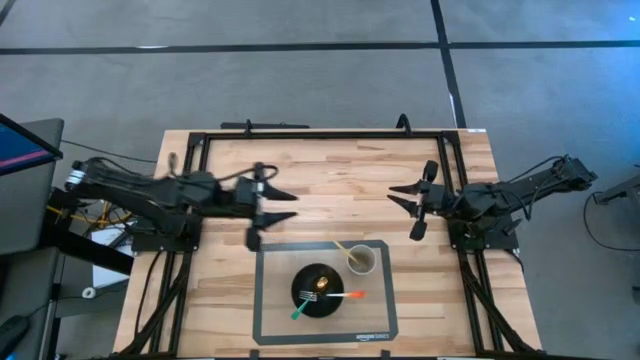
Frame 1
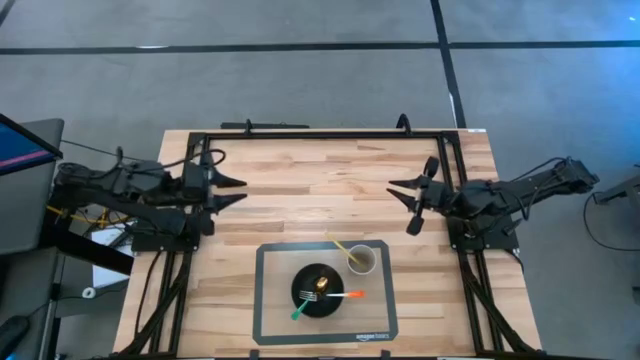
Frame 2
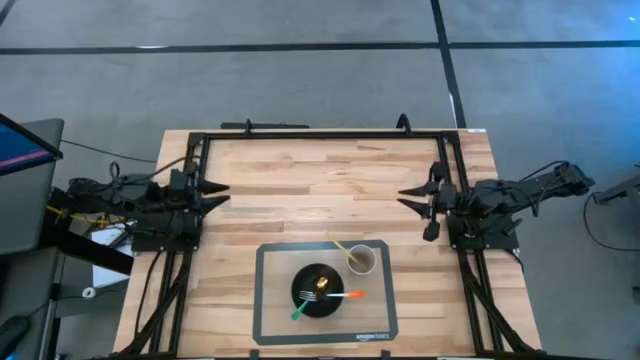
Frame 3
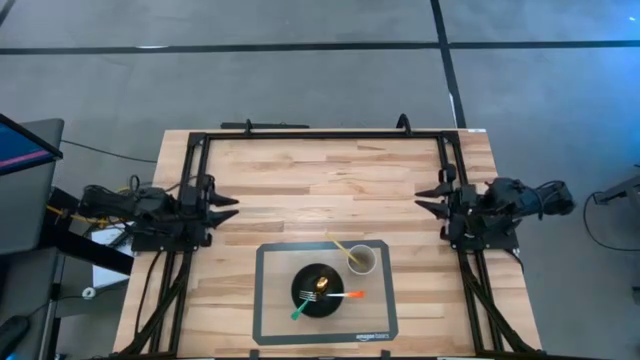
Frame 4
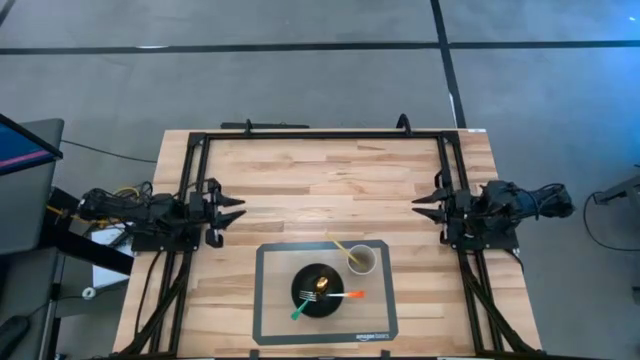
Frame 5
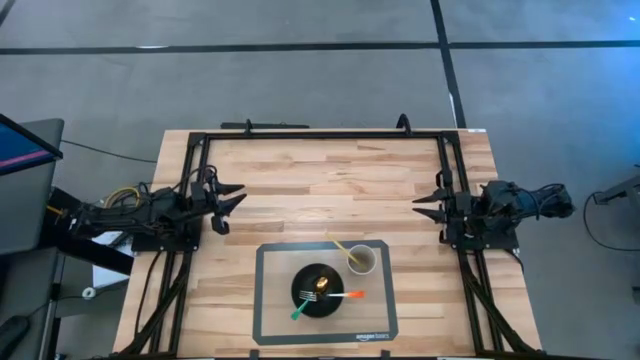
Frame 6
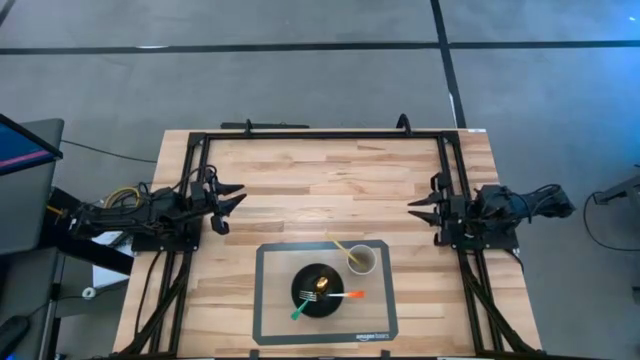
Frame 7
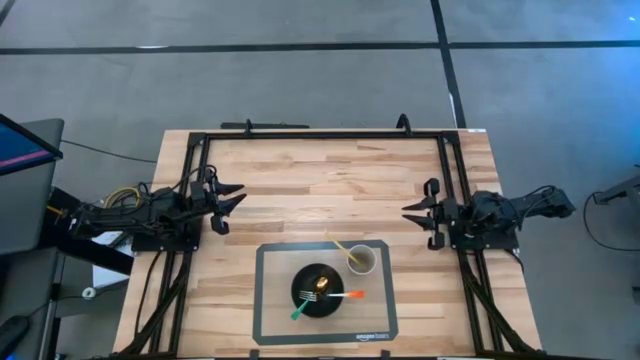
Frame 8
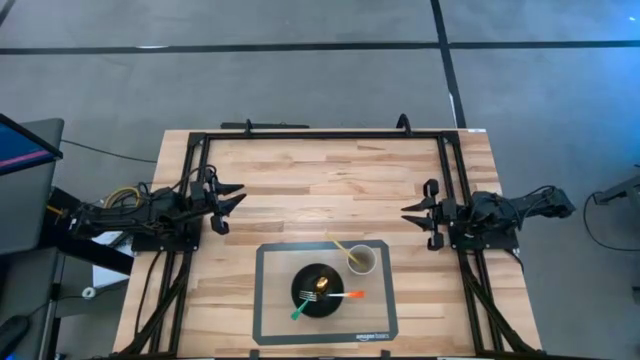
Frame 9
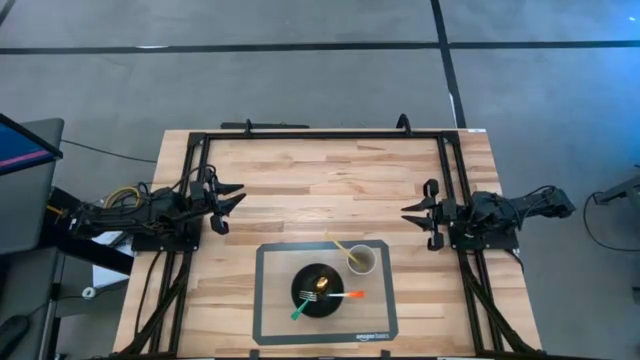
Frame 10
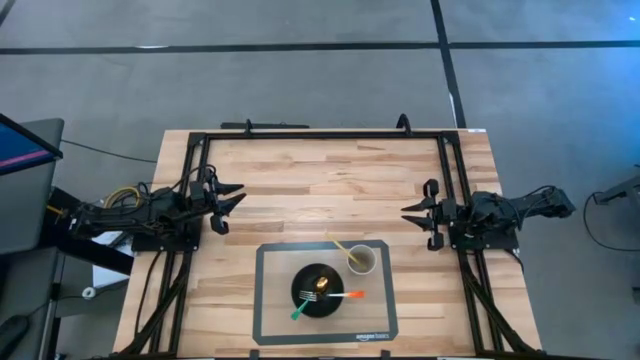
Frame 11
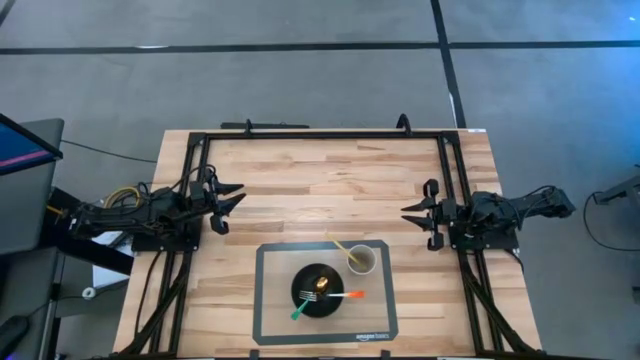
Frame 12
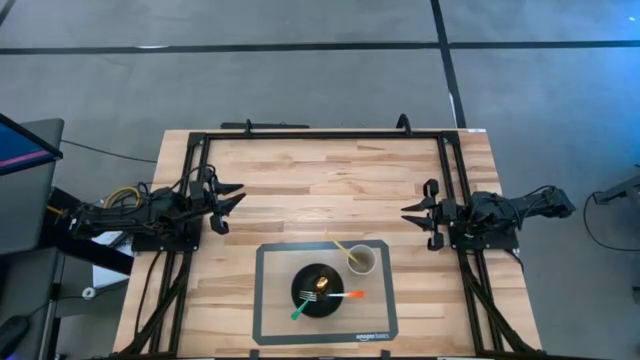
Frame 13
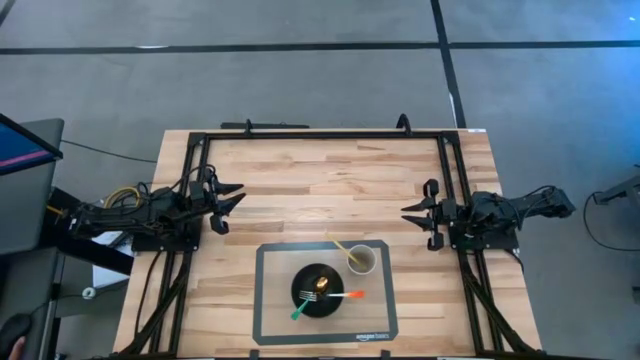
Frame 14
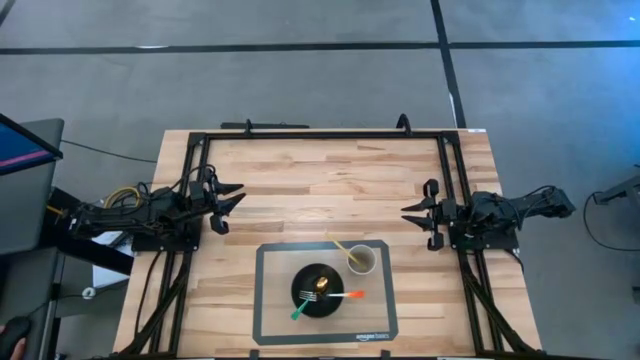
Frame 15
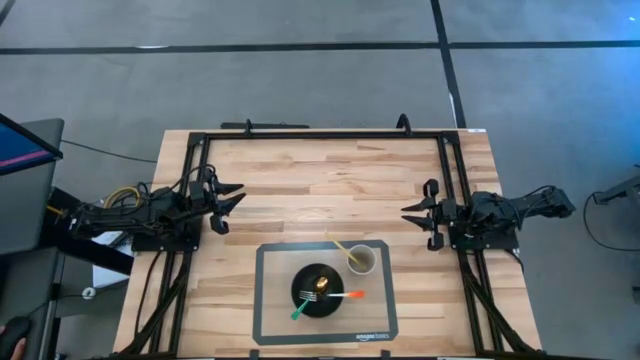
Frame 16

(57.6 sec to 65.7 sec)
Task: Pick & Place Utensil
Return to Home Position

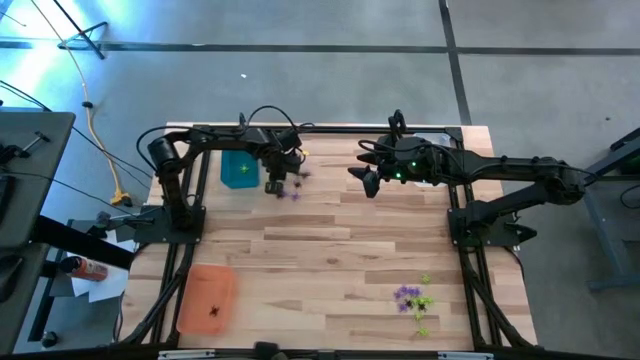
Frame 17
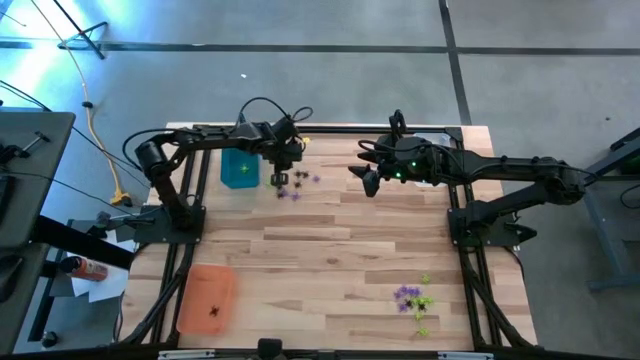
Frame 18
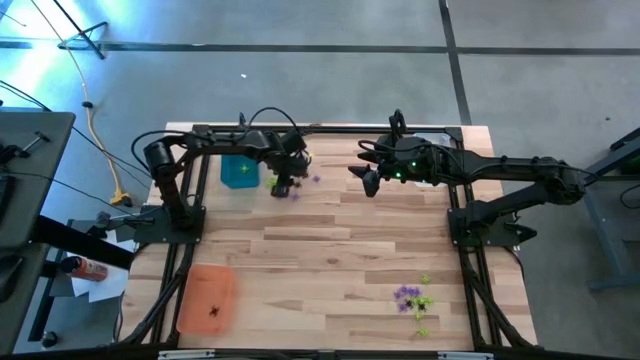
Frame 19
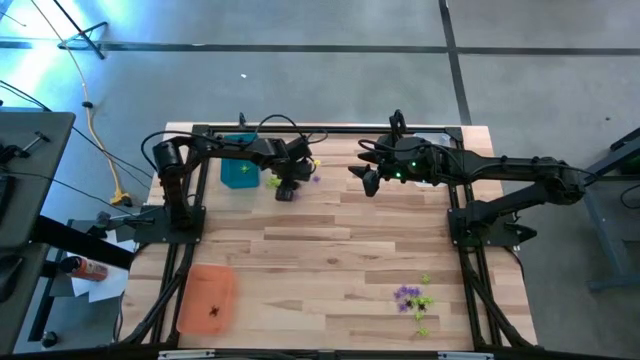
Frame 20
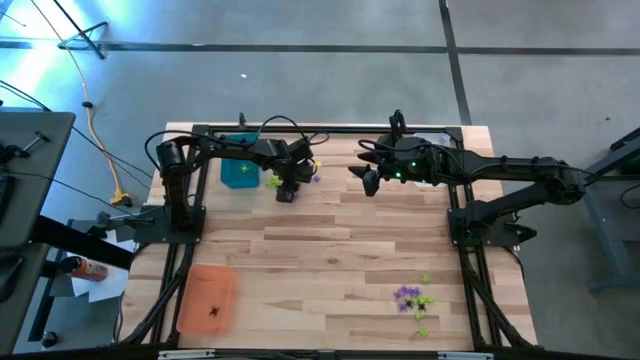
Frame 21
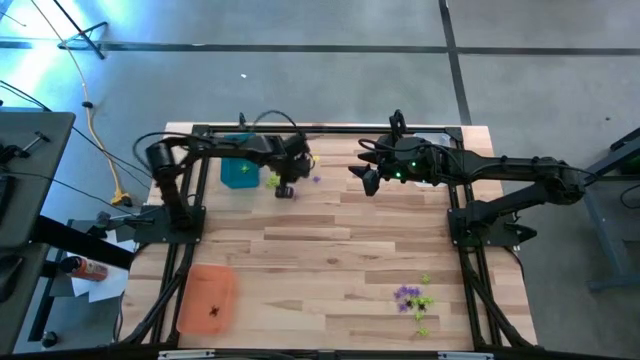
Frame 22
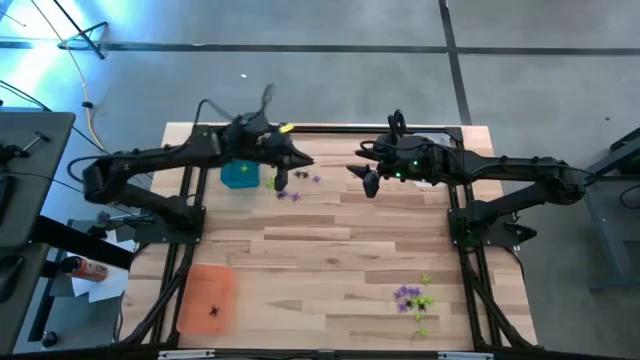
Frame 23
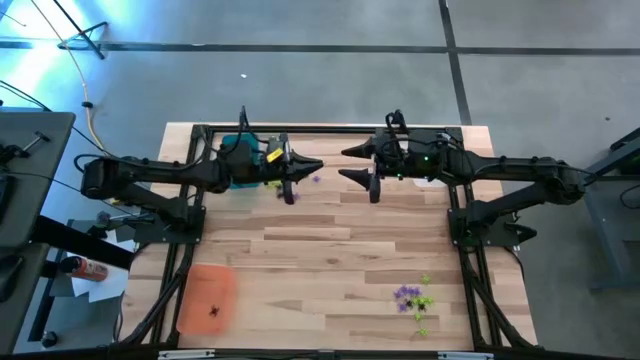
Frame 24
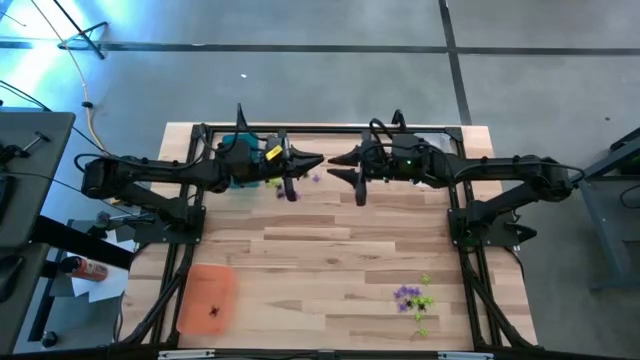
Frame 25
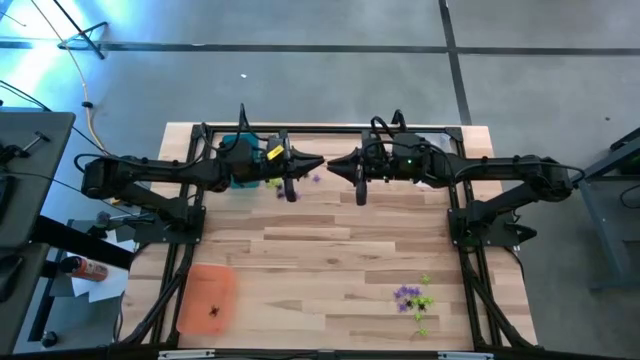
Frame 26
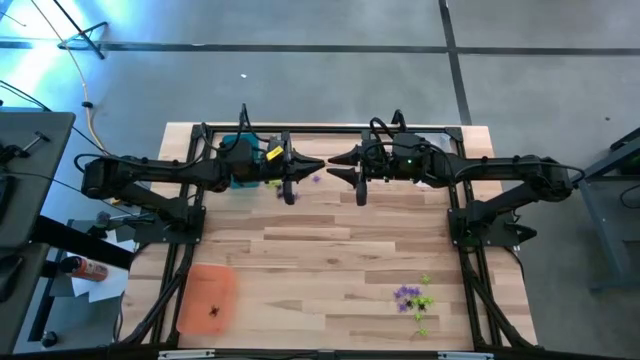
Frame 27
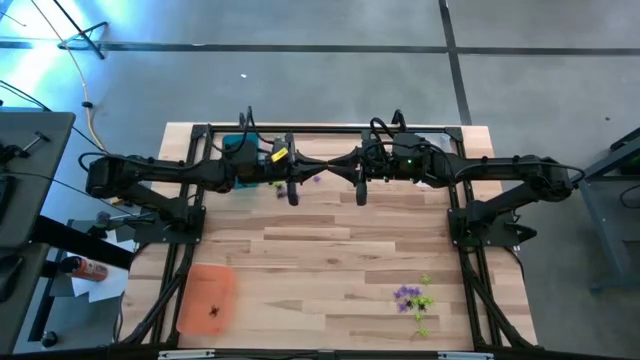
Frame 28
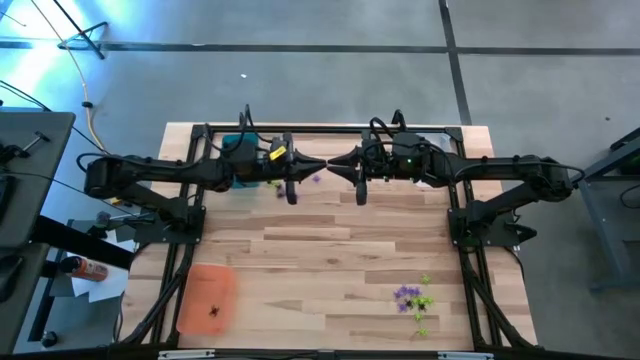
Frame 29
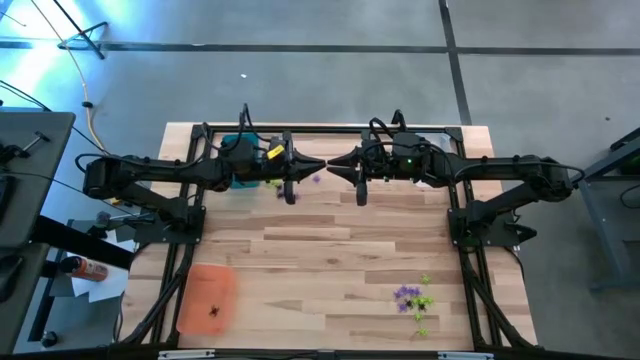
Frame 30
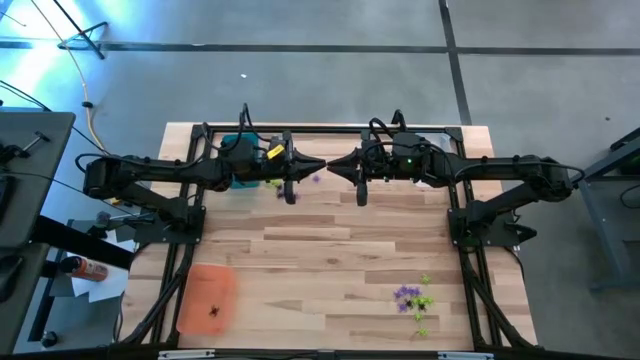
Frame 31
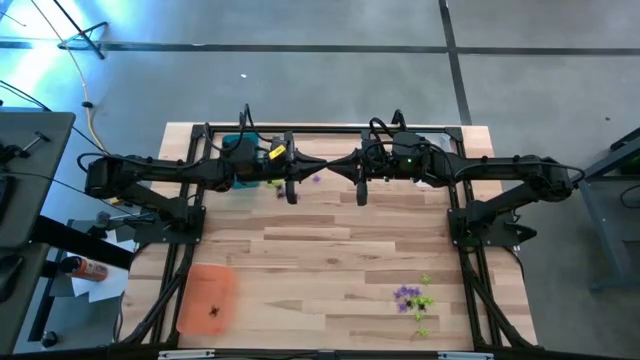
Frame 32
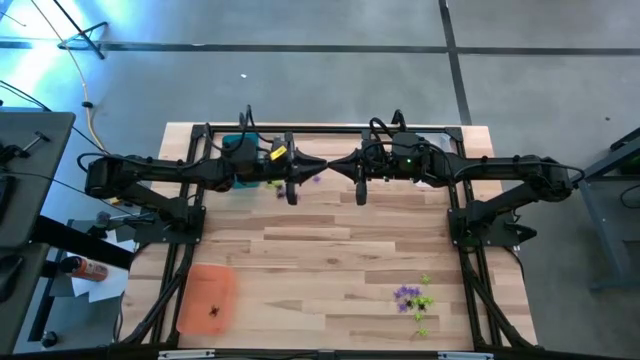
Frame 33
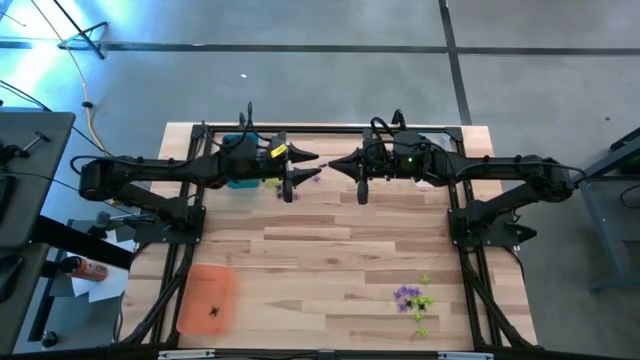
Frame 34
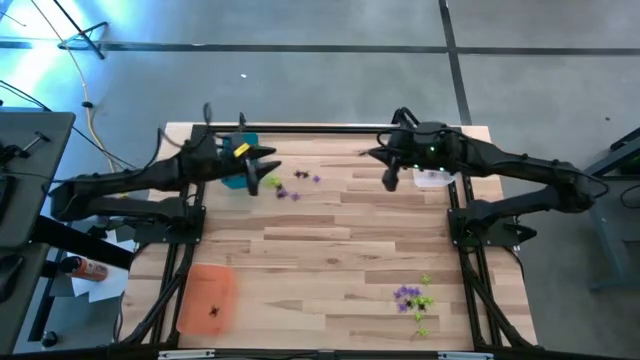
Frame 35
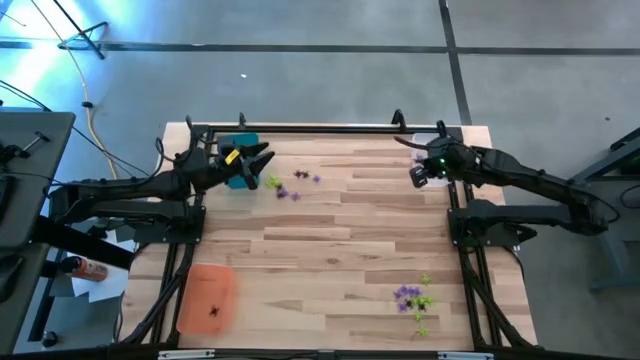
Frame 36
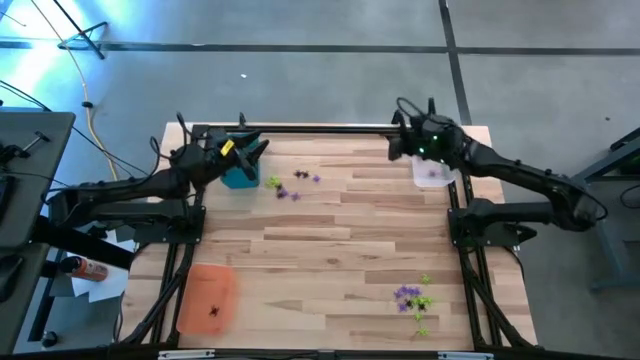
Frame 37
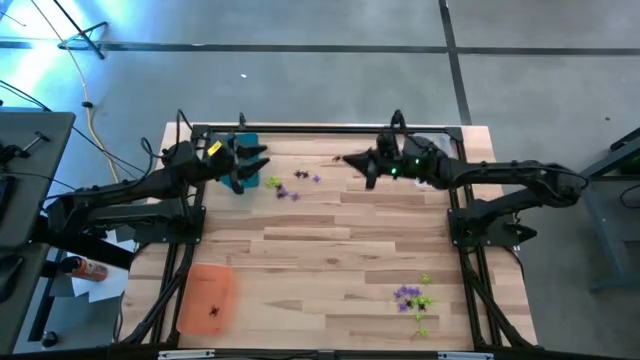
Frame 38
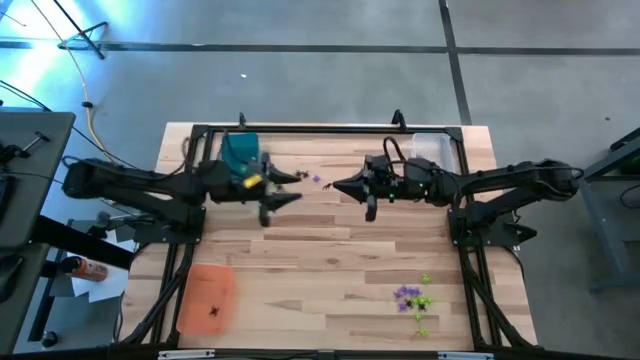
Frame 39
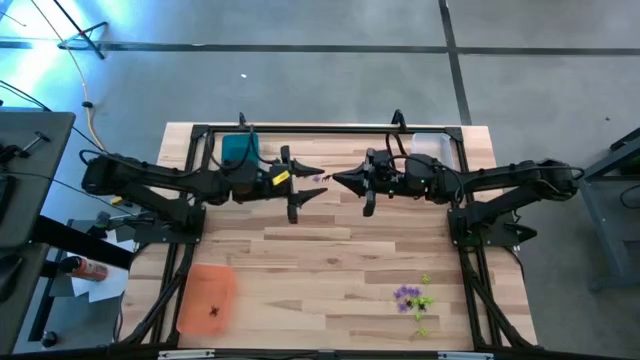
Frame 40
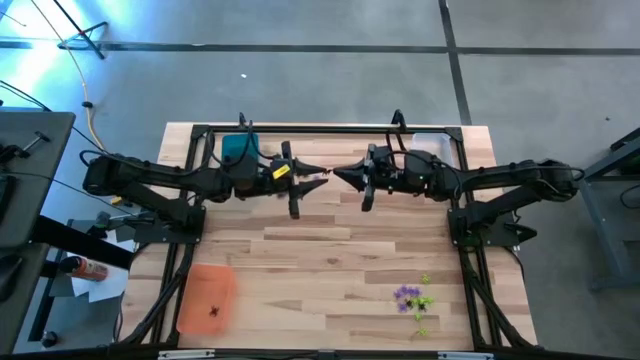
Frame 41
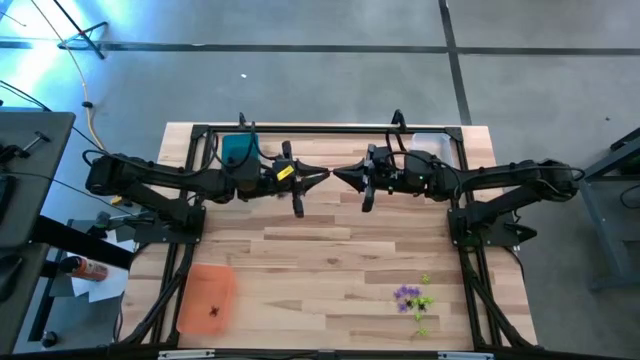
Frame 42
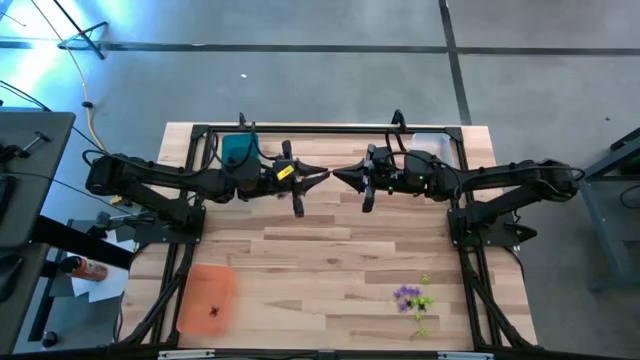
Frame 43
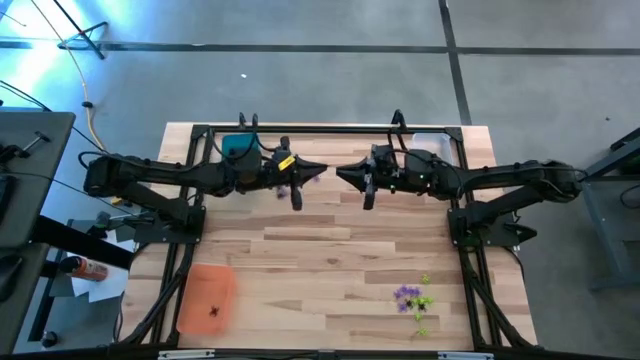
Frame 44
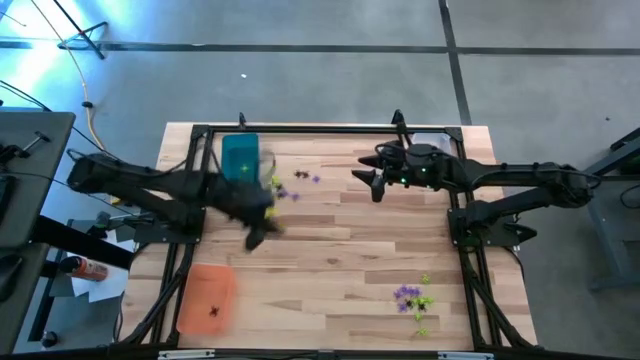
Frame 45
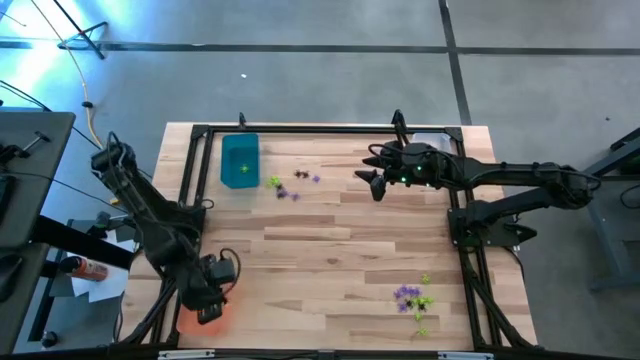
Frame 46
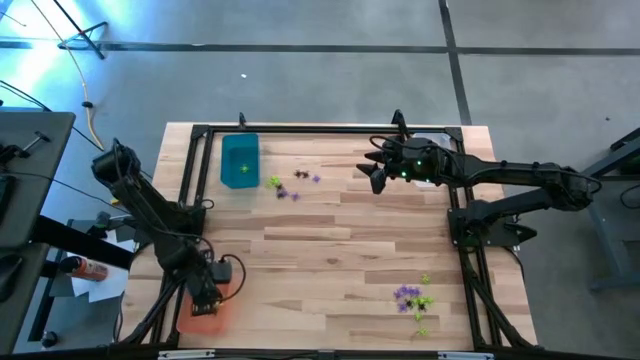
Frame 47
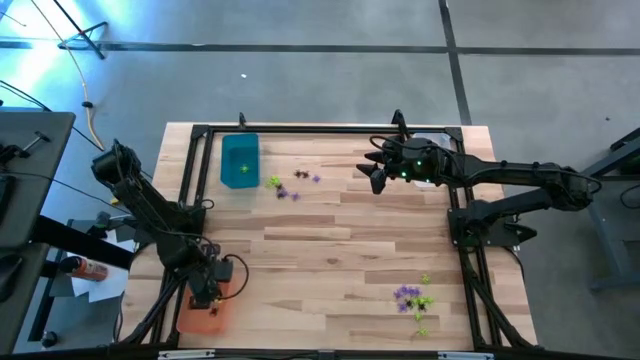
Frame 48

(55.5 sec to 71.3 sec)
Task: Sort Halloween decoration
Put the black spider toy into the orange bin
